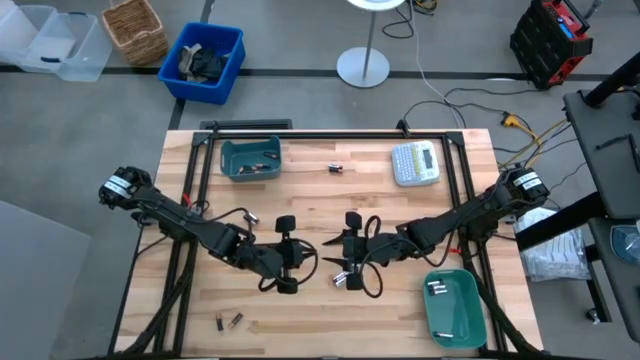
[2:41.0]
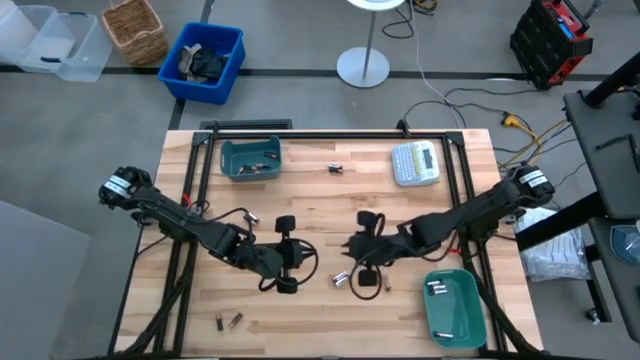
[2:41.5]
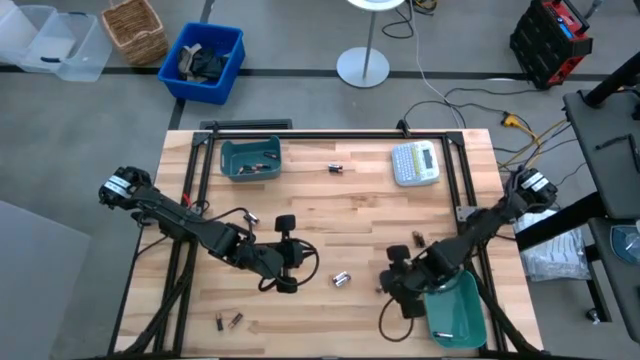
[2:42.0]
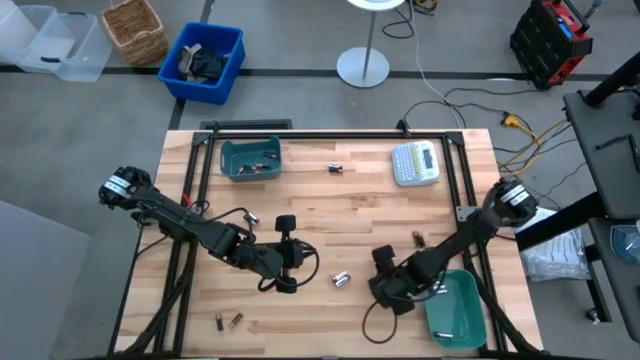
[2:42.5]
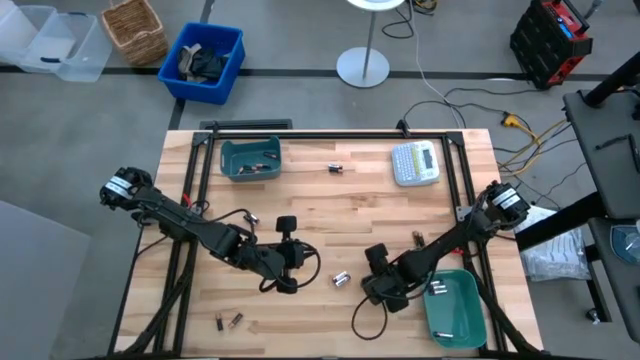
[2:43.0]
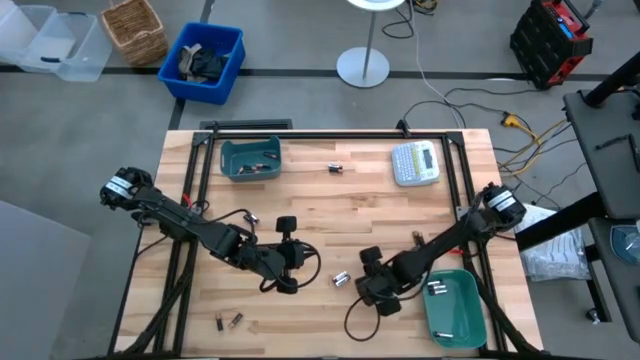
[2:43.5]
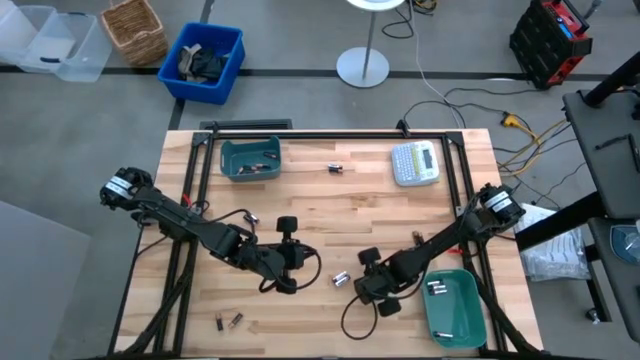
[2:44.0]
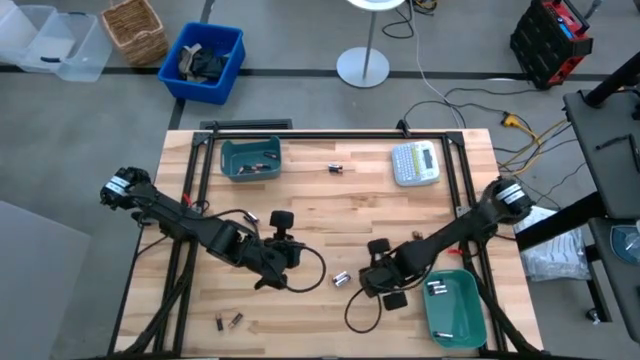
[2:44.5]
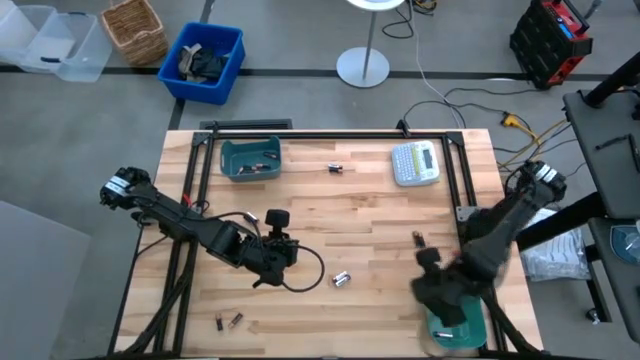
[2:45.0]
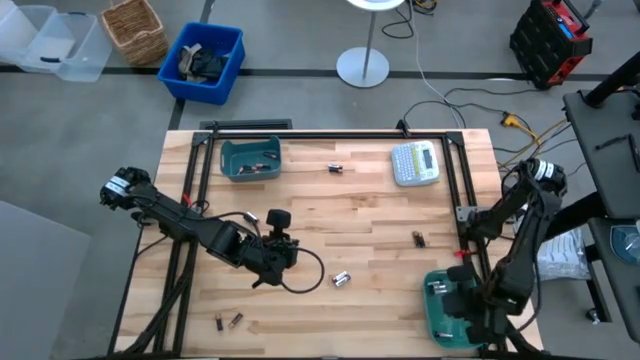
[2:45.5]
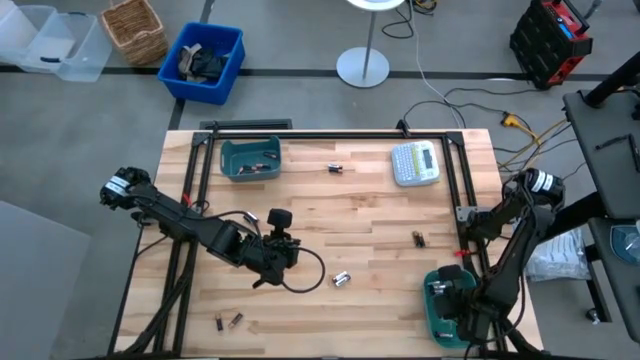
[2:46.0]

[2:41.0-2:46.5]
Task: Sort batteries
Put the silver battery into the green bin

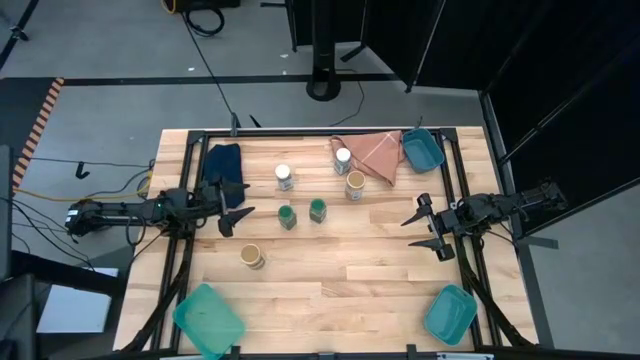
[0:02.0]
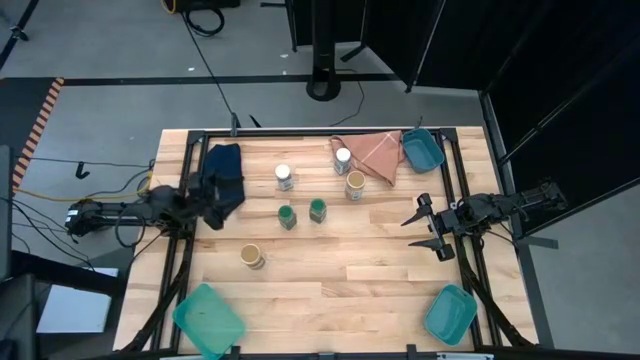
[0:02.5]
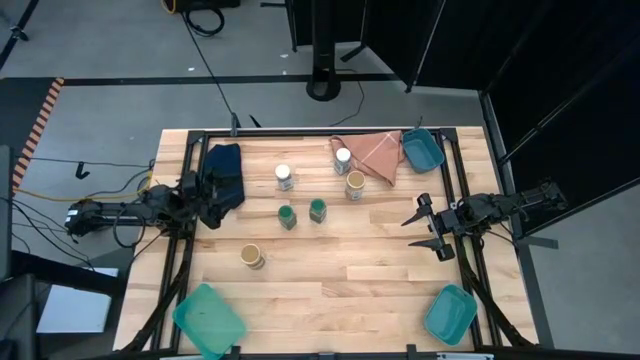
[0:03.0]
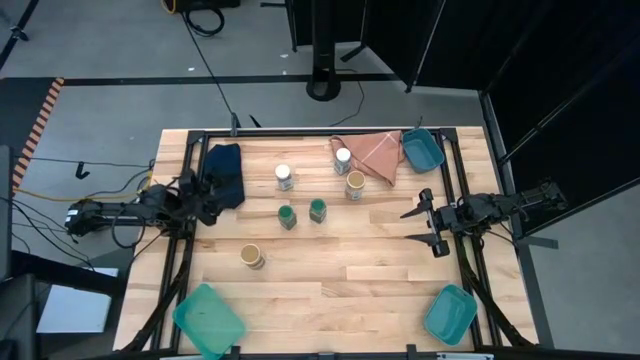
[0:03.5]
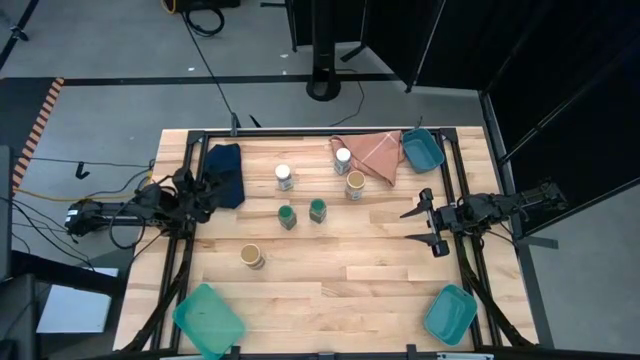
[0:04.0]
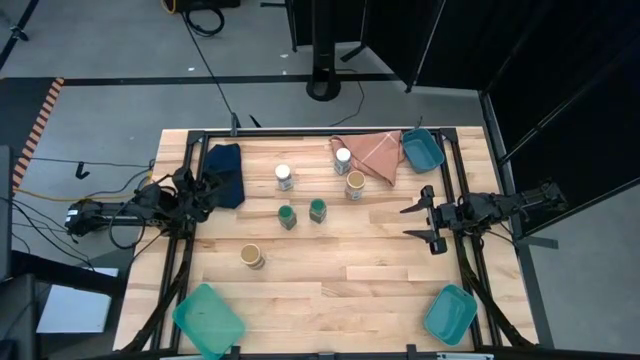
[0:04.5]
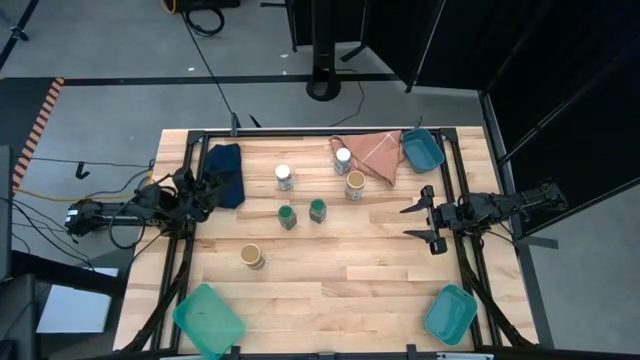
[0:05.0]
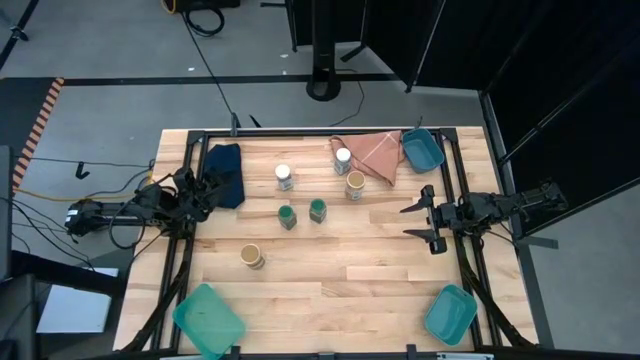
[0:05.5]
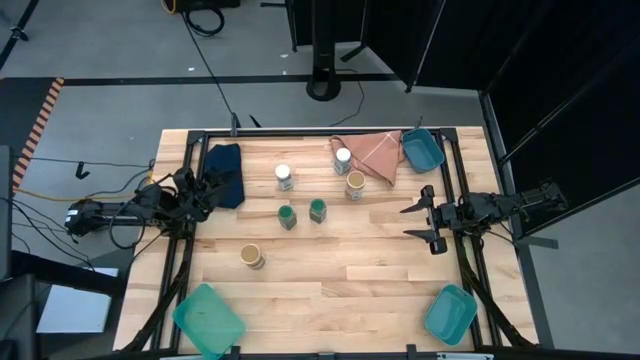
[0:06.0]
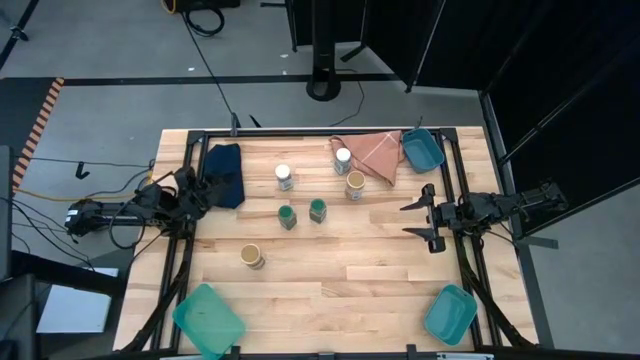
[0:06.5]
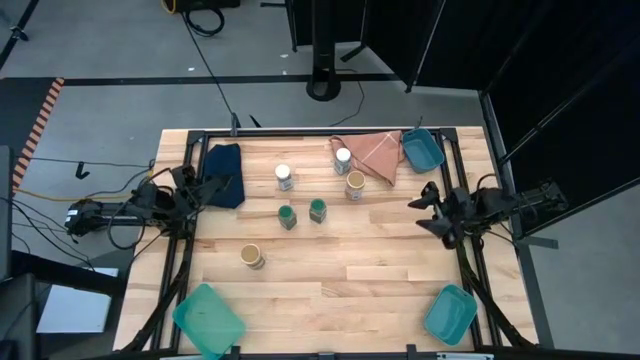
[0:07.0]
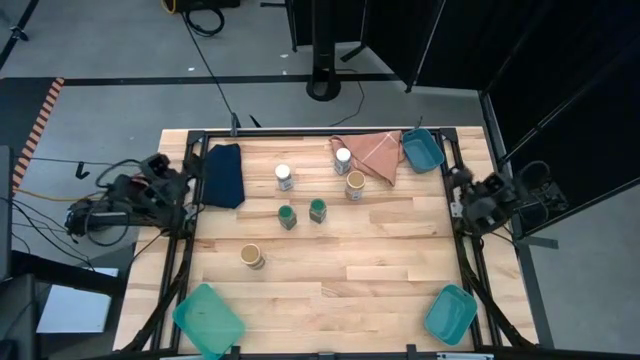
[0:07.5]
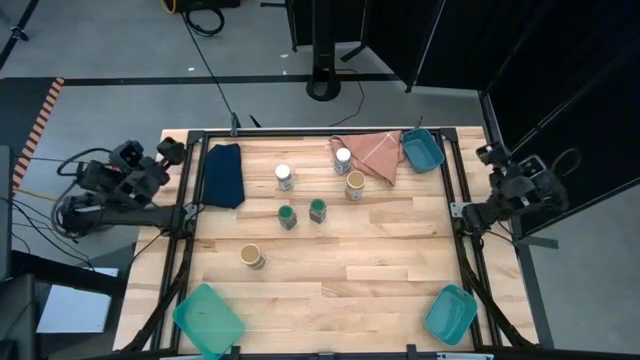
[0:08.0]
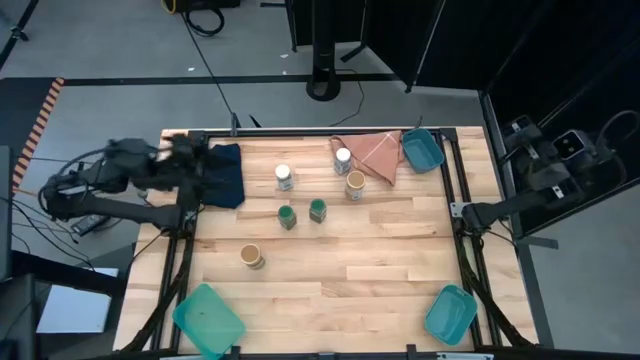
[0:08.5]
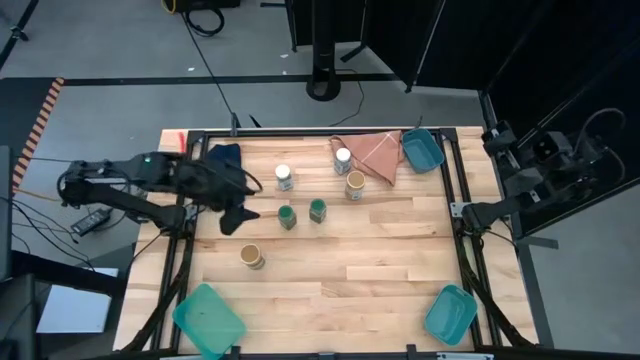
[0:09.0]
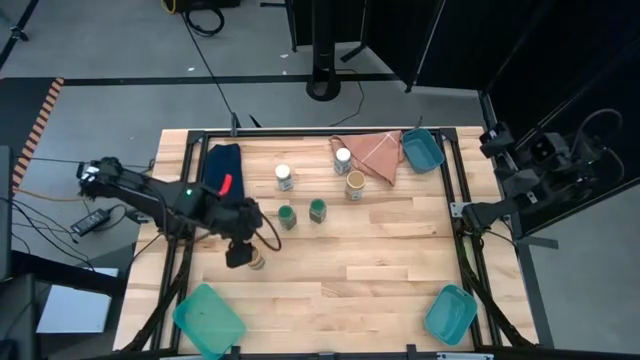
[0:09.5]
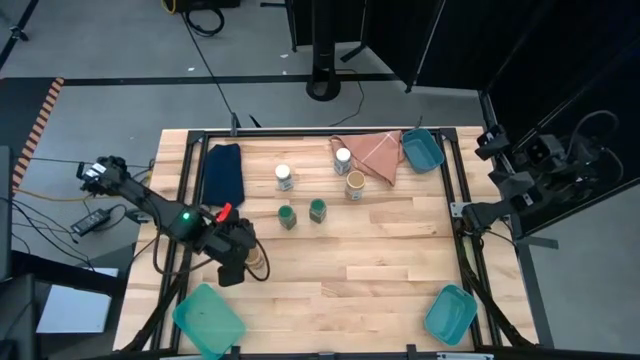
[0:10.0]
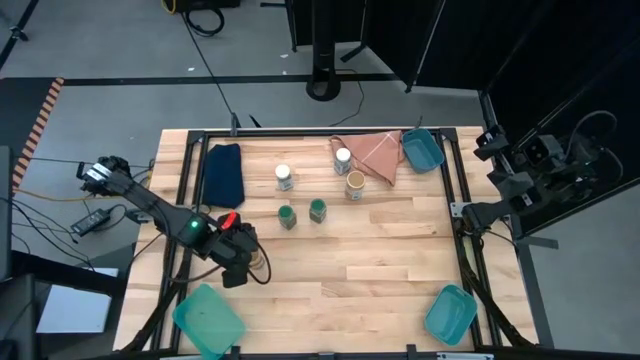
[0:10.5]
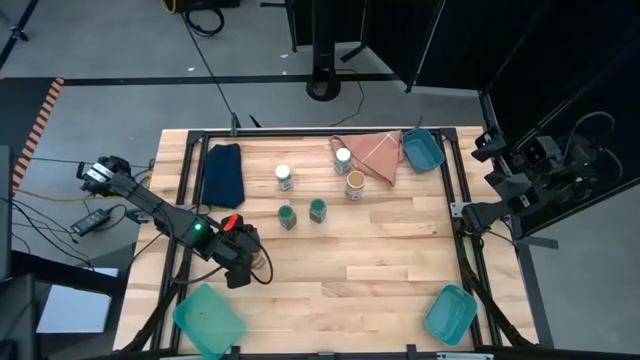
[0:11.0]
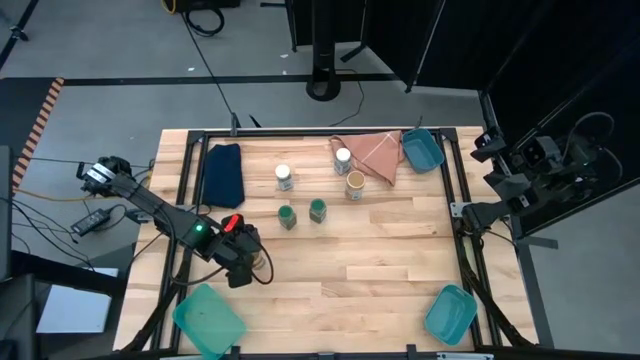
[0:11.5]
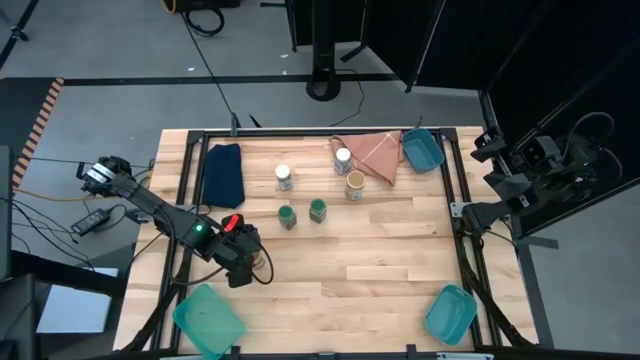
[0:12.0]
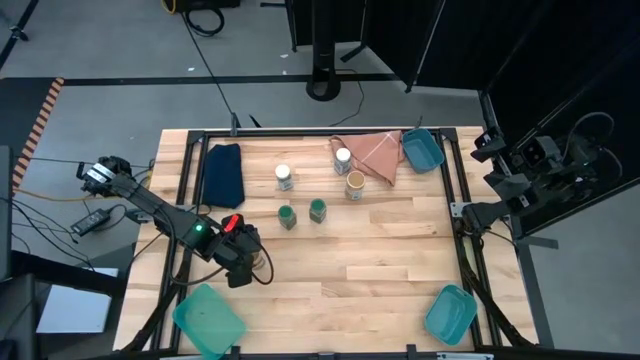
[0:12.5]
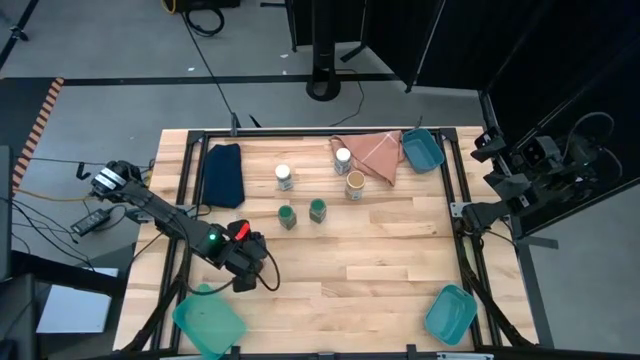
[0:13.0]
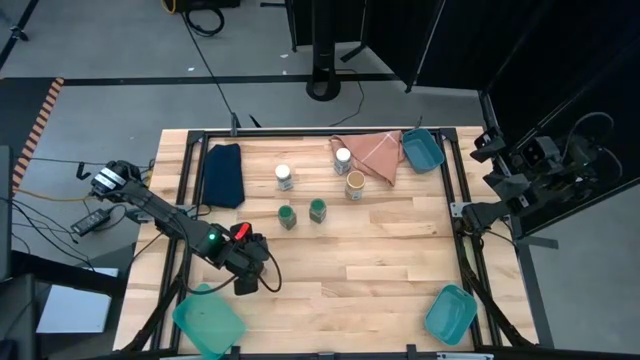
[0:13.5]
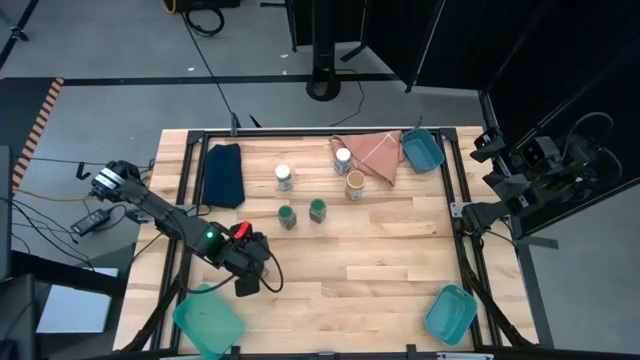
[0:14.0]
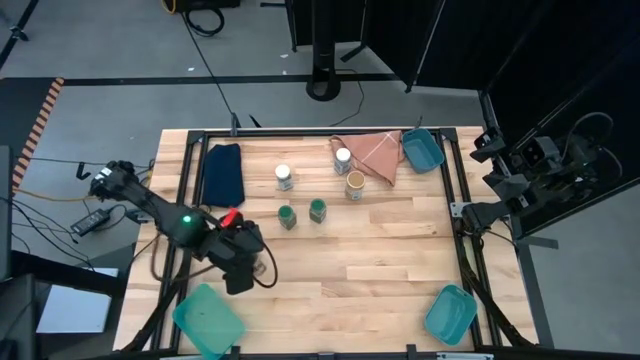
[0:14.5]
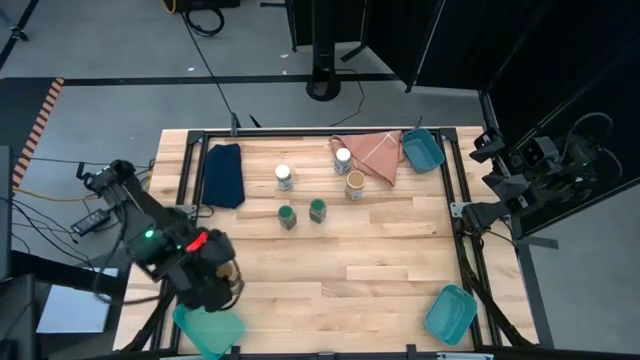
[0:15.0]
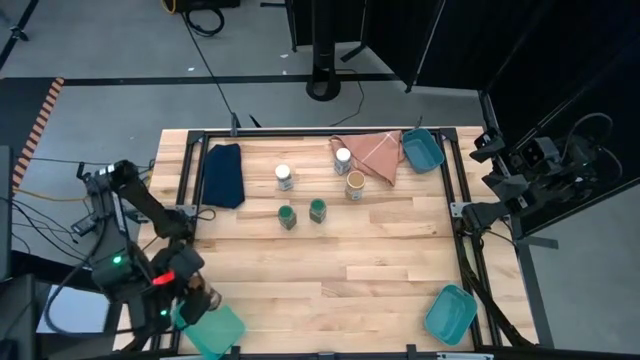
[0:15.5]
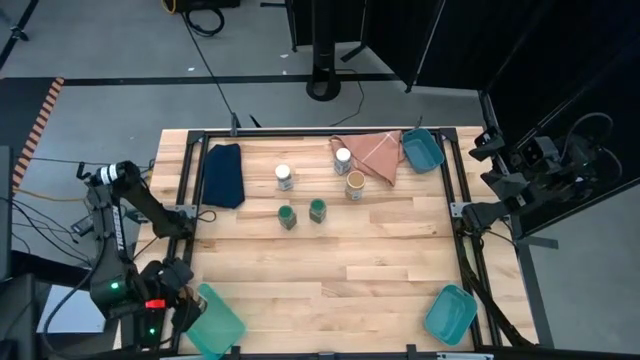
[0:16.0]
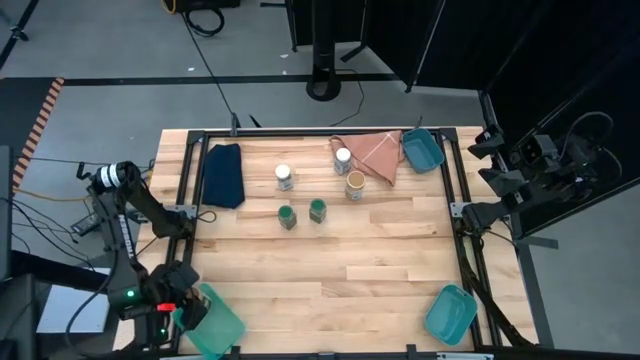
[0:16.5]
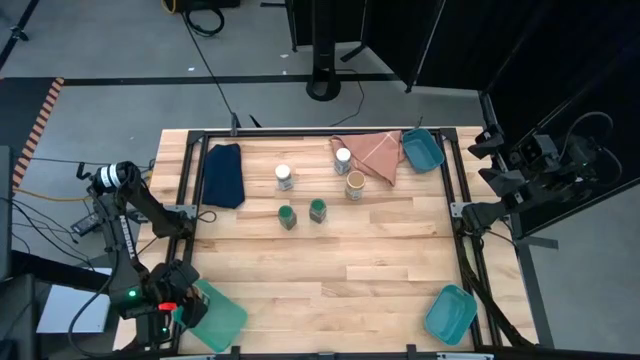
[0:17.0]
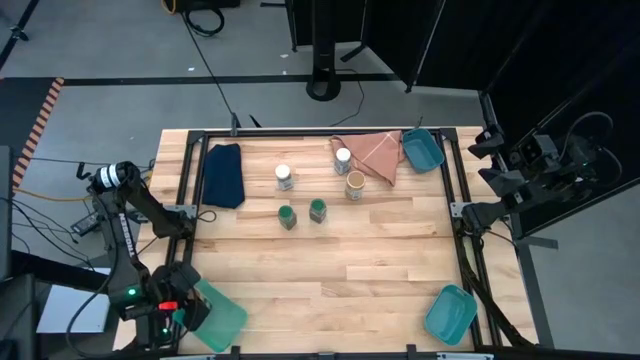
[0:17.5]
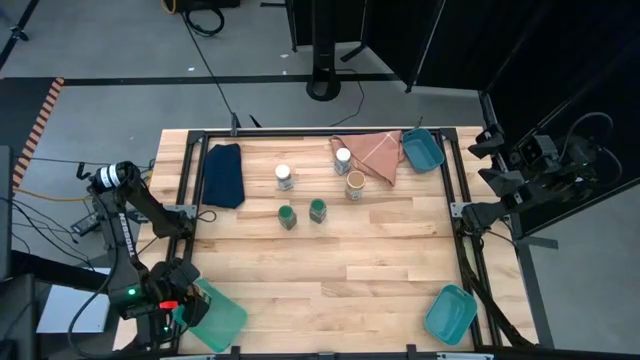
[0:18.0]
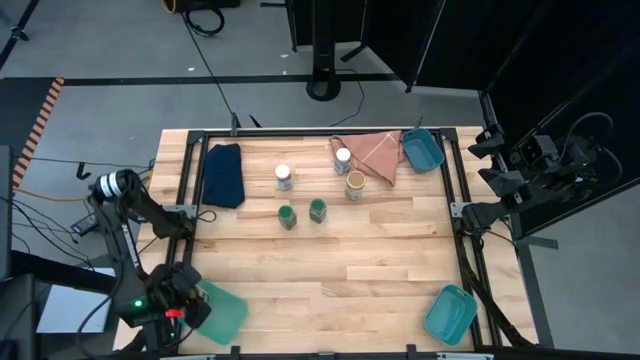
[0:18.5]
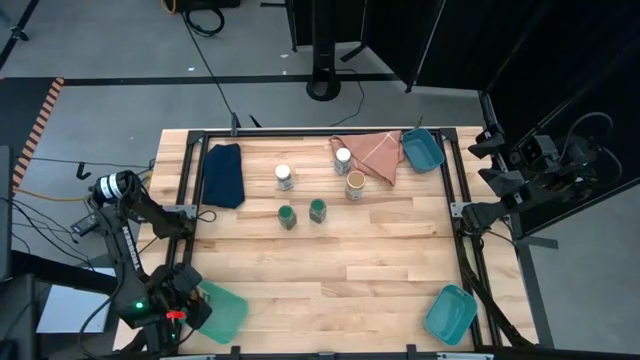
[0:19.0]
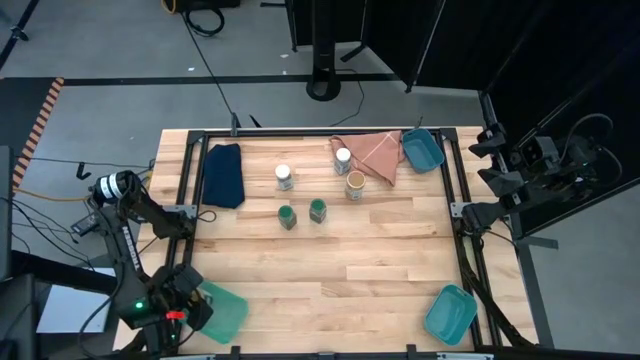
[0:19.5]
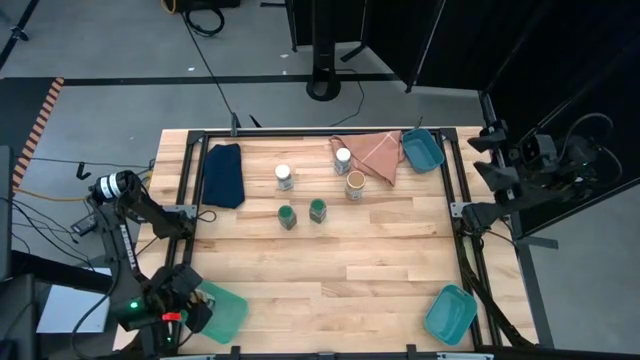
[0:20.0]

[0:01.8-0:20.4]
Task: Sort spices by type
Put the bottom brown seasoning bottle into the green transparent bin
